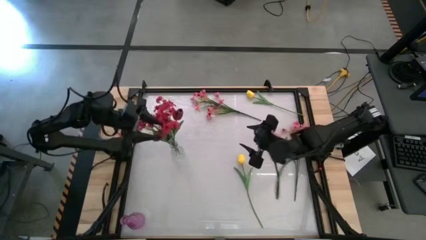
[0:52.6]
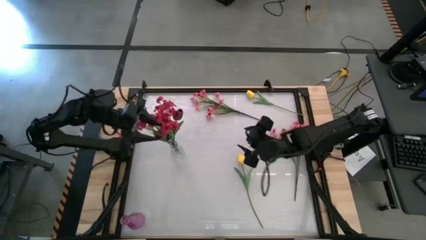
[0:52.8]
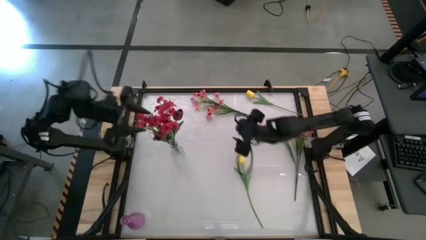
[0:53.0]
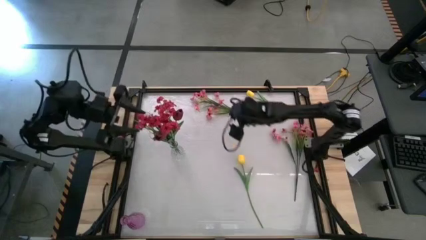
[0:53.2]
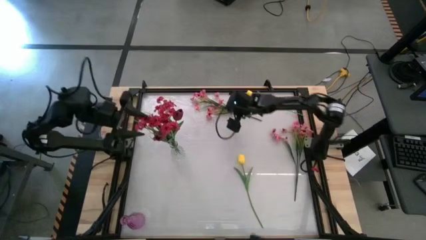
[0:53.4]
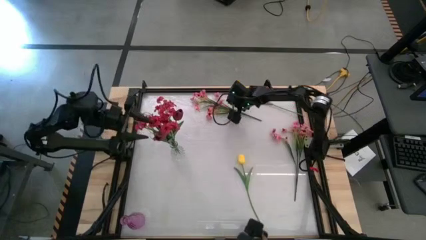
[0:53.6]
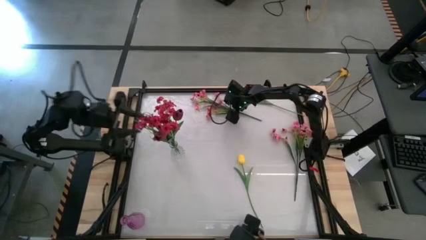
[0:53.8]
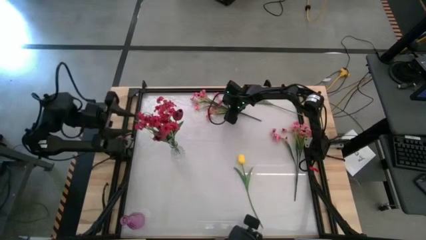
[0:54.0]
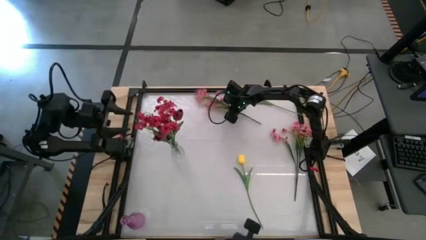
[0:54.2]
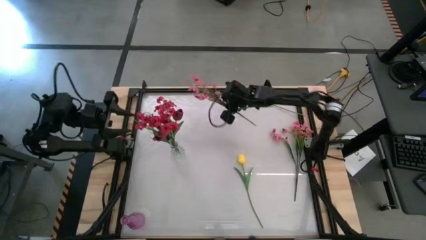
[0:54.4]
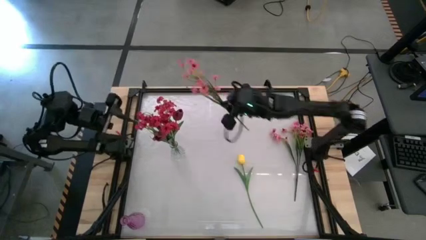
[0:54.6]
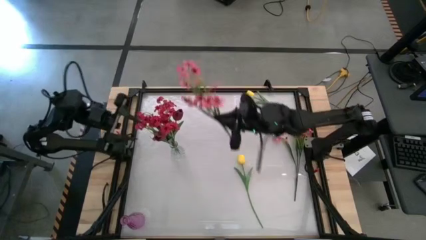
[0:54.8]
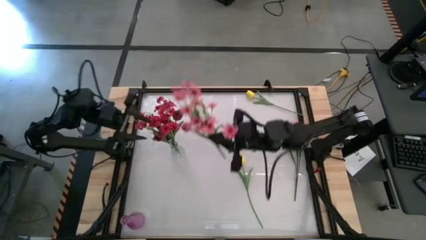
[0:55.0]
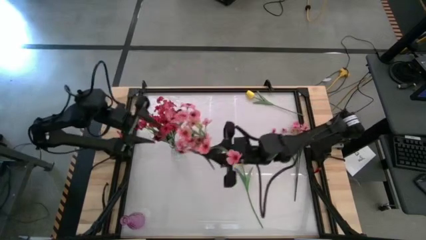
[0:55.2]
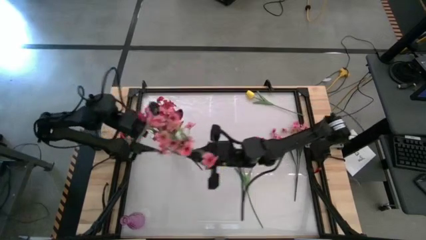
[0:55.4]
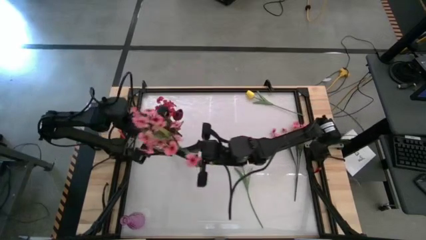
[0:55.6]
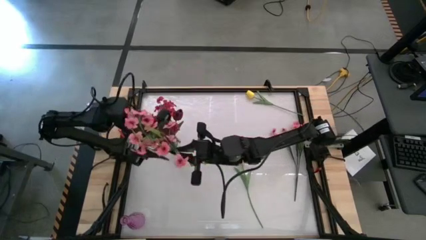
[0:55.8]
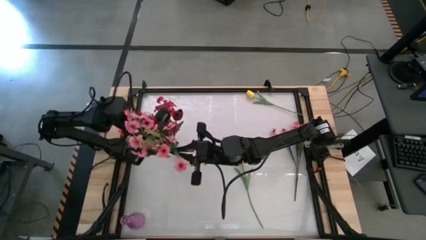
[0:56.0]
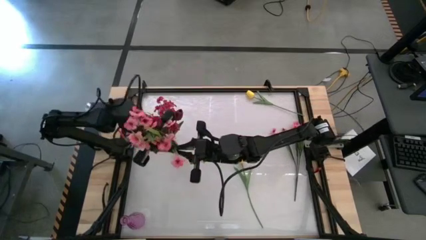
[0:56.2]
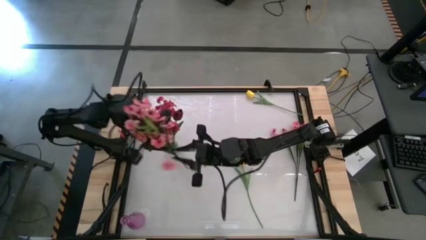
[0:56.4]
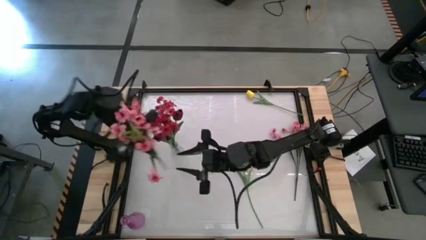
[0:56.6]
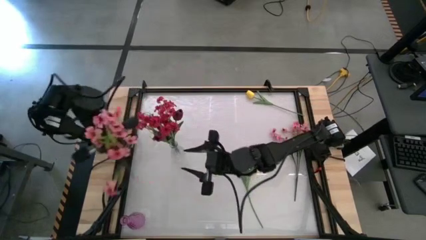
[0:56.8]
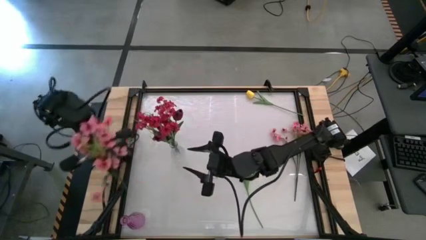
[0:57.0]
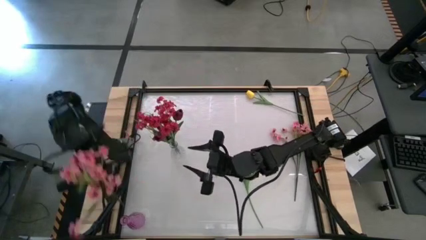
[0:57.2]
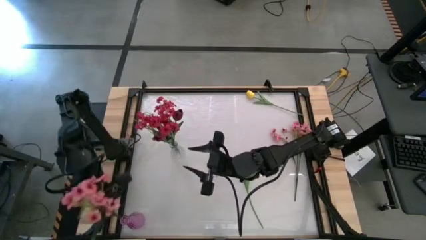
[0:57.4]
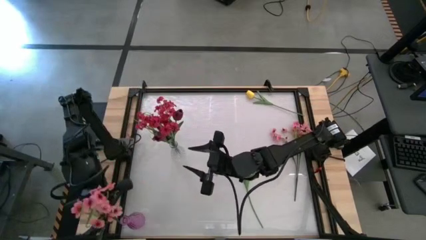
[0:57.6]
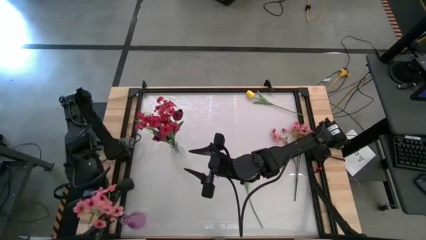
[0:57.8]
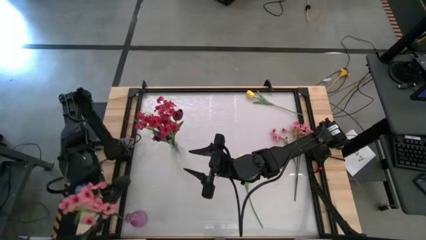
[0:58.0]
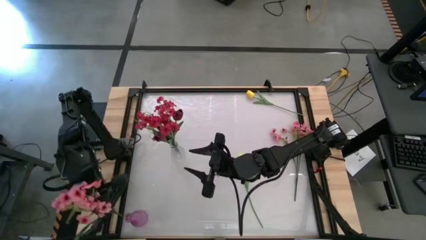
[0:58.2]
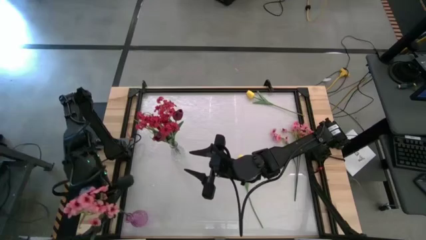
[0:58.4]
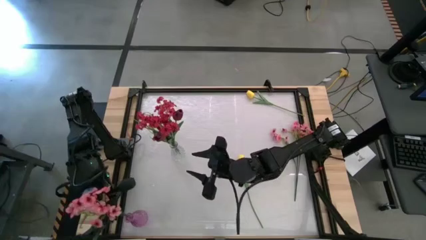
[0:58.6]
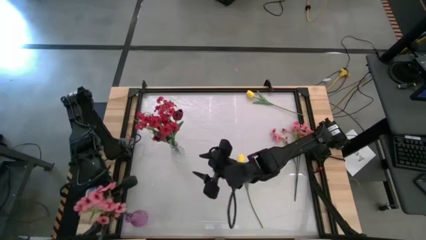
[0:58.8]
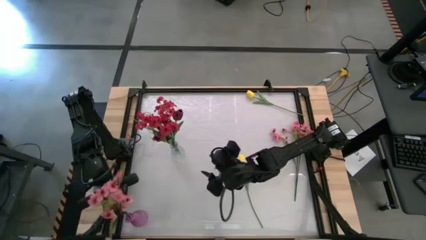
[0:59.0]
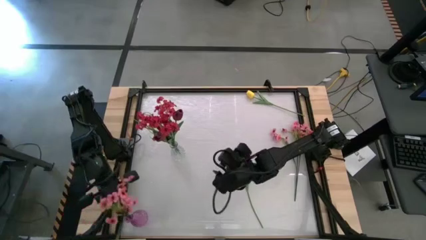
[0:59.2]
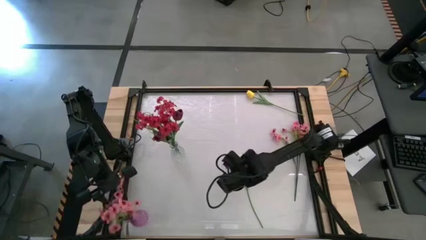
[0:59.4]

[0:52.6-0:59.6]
Task: Sort flowers into vase by color
Put the left pink flower into the purple vase

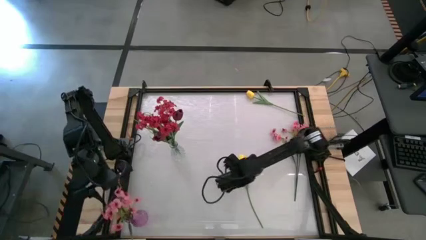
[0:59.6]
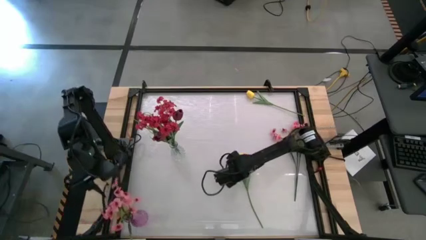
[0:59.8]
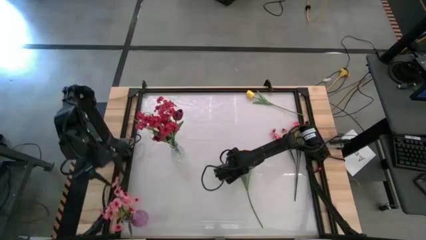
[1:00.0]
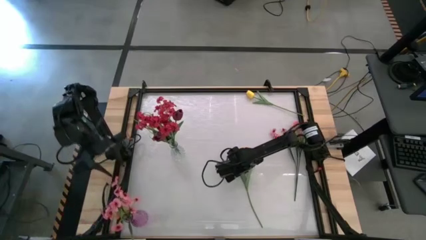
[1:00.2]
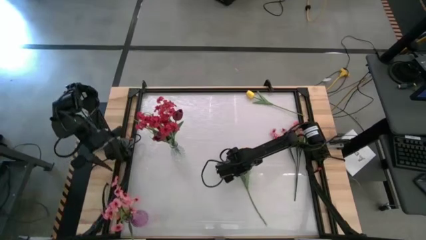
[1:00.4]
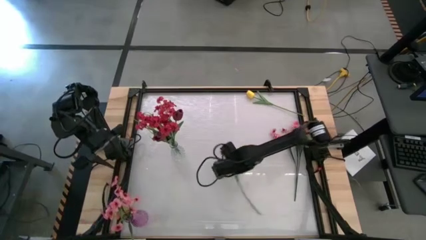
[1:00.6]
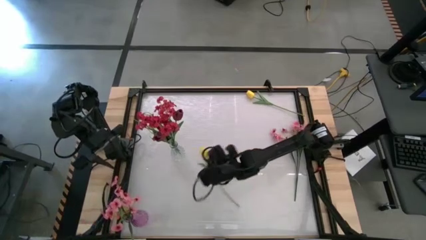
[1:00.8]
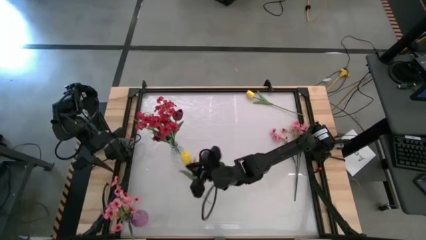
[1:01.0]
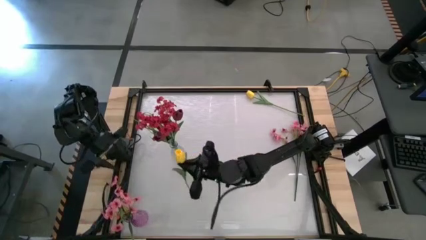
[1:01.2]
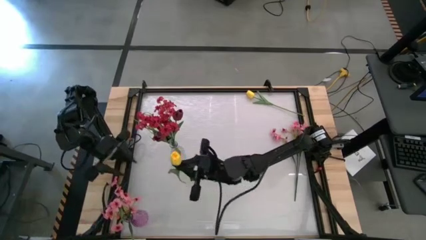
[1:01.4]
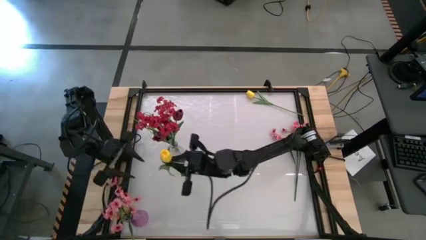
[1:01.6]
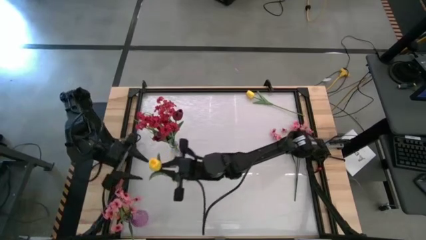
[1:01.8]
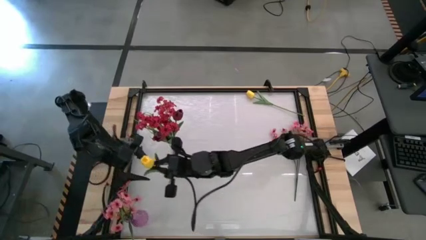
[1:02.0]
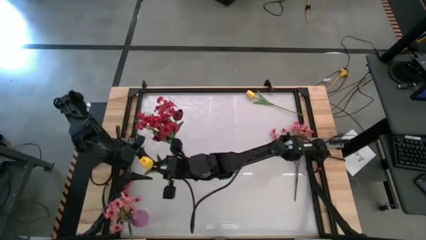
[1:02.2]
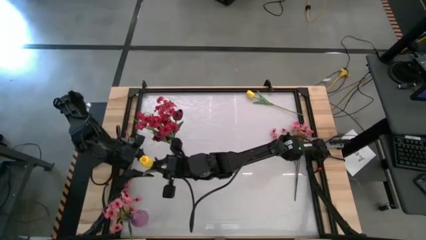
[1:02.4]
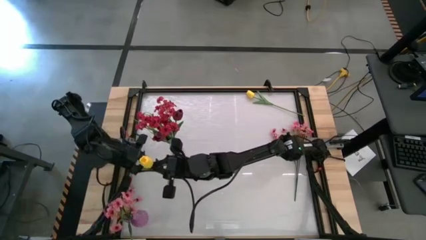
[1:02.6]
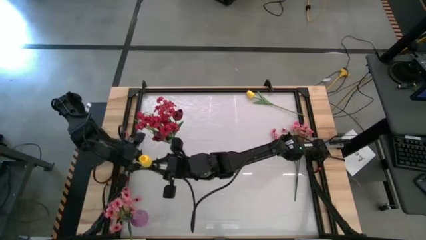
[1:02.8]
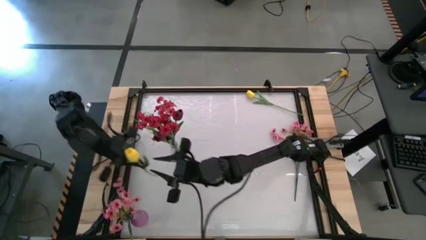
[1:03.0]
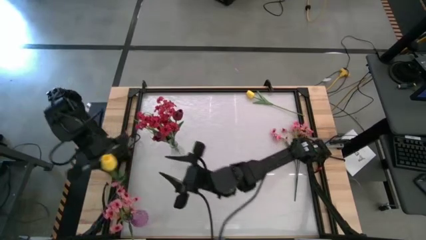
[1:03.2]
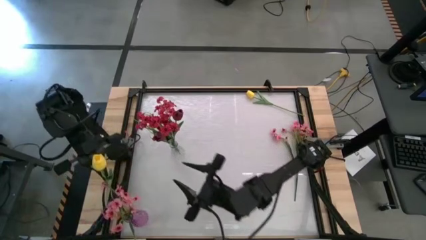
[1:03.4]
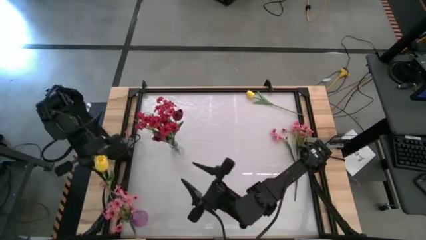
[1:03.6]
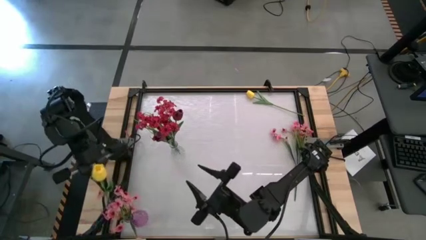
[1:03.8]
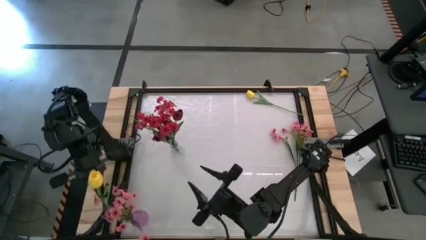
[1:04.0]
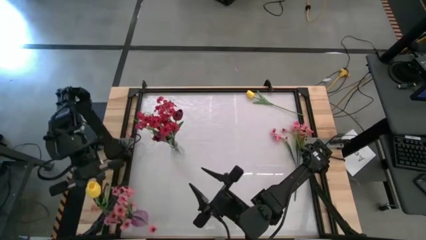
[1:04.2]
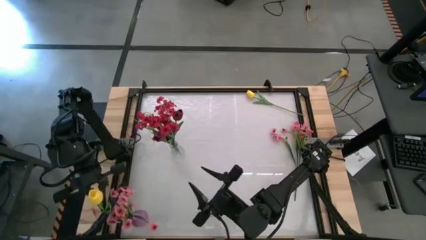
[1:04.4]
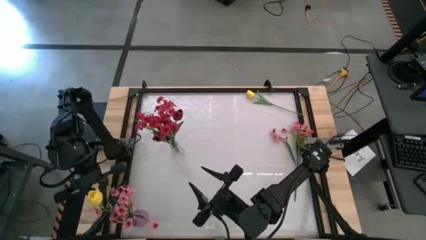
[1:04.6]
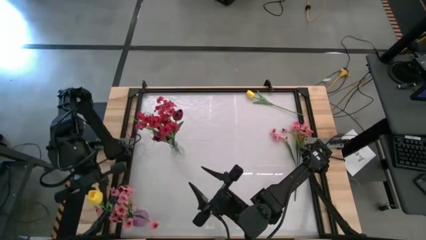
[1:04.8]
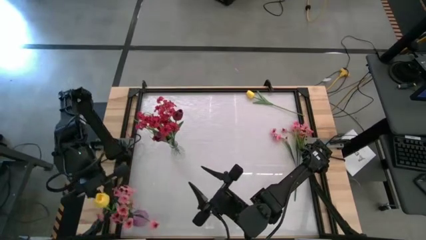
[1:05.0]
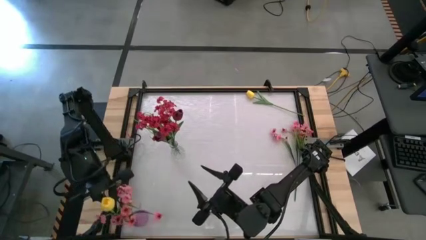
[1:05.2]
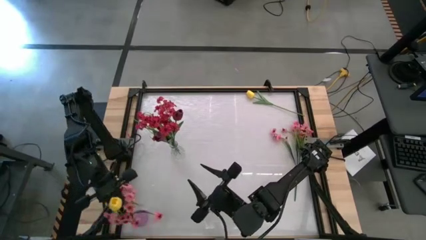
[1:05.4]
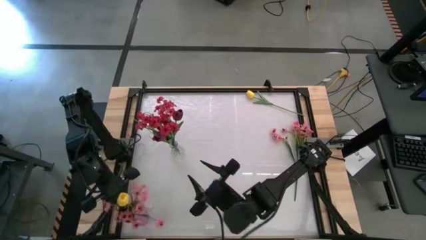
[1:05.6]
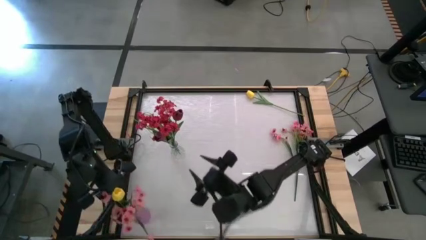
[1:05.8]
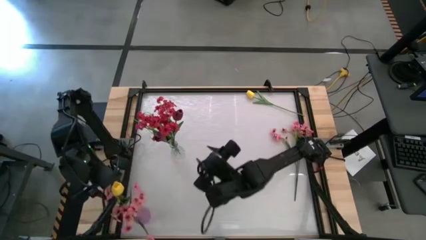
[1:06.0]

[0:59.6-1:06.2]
Put the bottom yellow flower into the purple vase

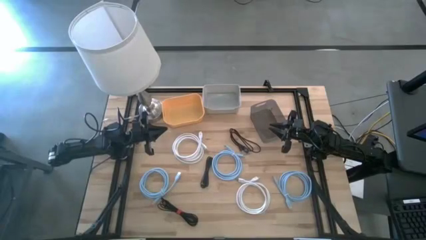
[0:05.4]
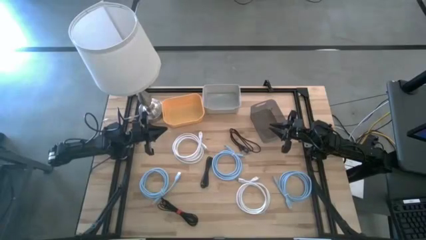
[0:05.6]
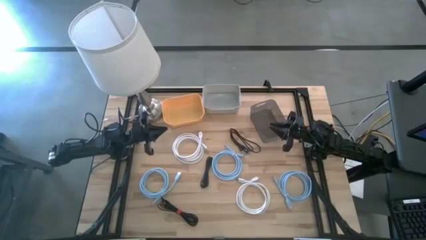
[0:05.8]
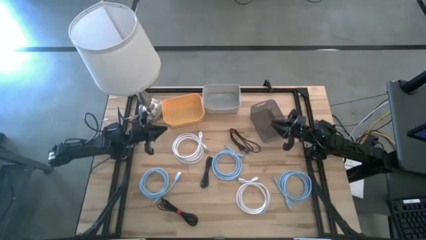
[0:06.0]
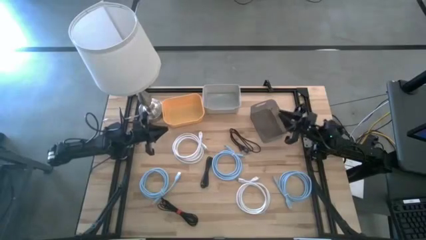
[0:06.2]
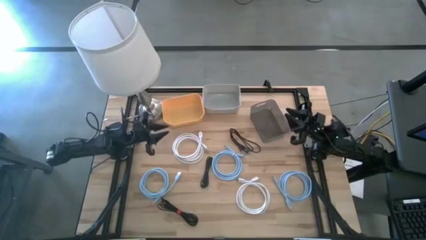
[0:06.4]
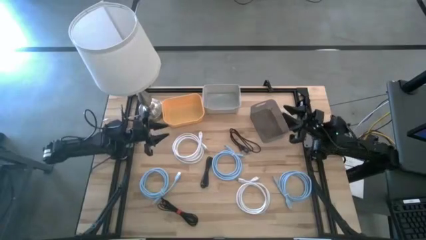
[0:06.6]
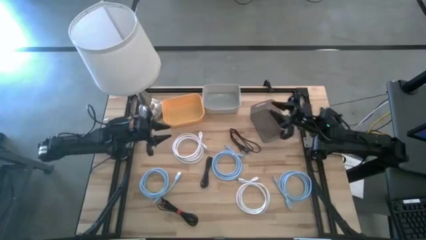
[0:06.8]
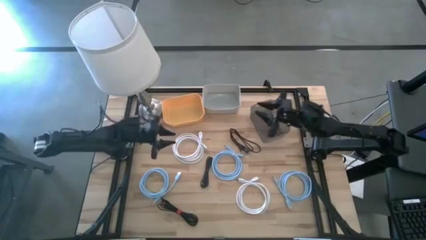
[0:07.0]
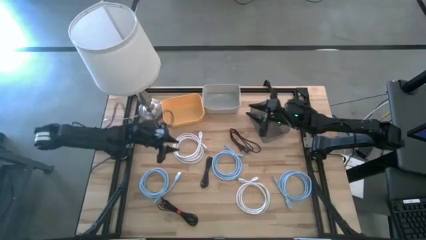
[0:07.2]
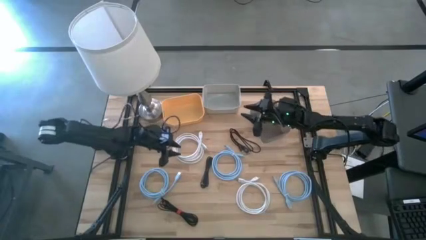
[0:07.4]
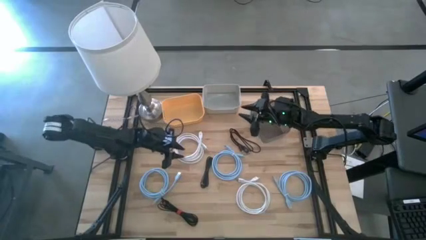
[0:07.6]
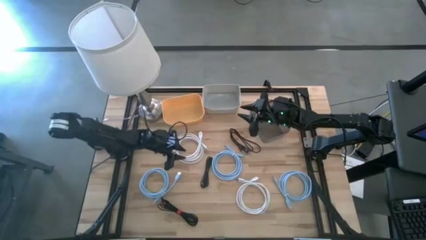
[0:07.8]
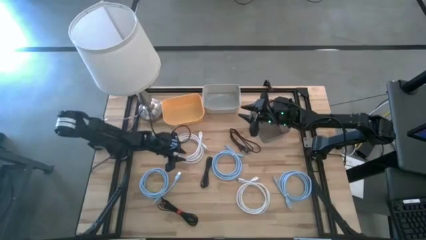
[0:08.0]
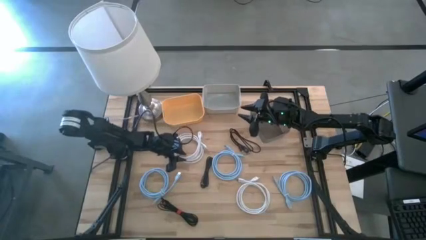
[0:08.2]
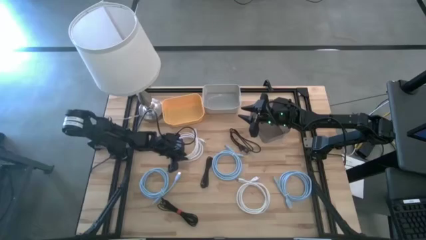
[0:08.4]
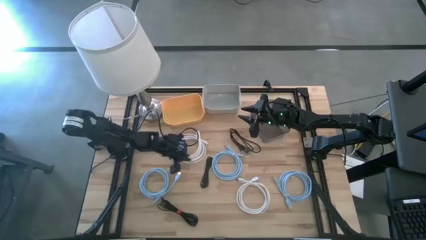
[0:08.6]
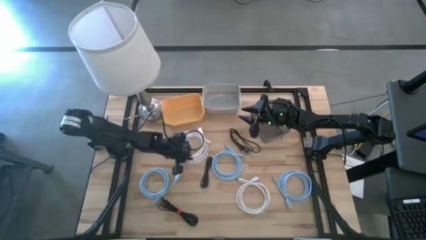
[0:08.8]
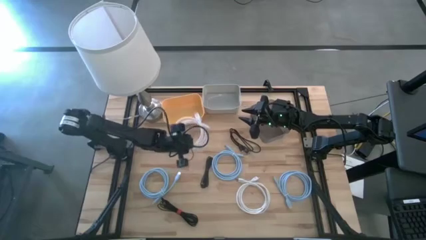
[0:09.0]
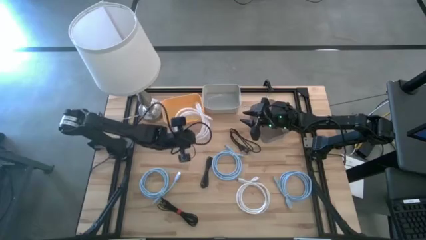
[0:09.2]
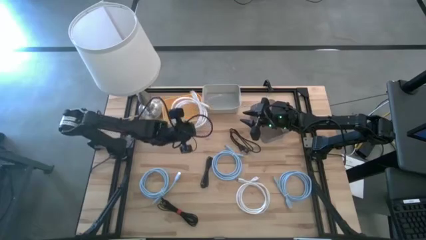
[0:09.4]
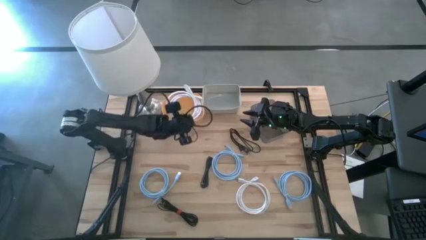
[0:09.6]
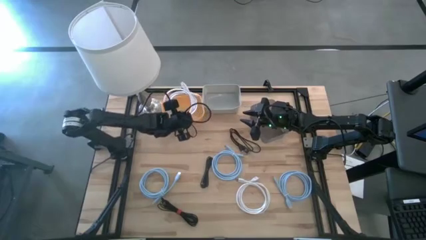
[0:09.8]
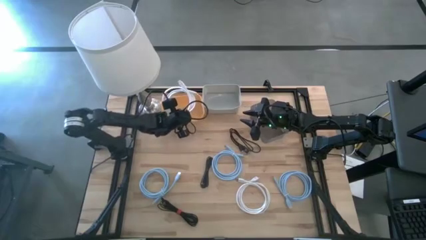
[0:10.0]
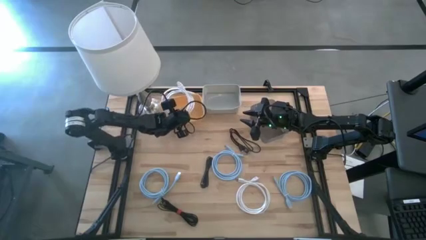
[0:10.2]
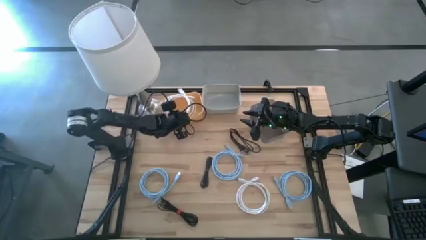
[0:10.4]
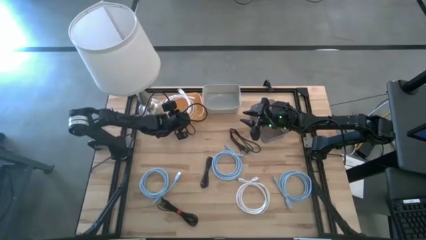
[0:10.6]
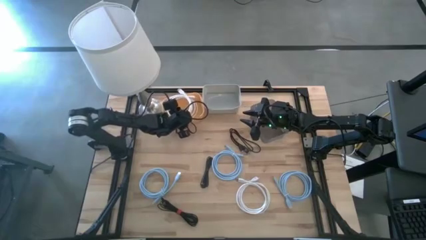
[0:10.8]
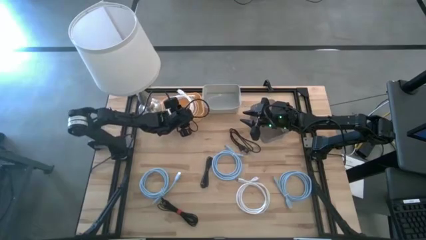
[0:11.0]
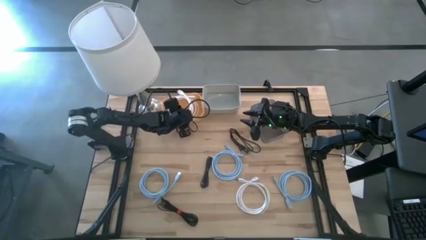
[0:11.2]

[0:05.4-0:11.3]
Task: Pick & Place USB Port
Put the top white display cable into the yellow bin
